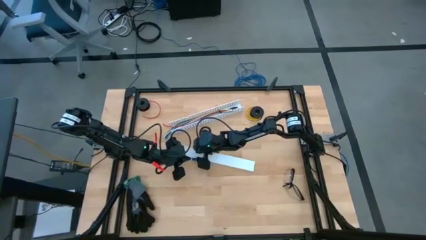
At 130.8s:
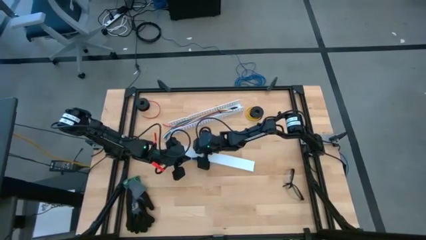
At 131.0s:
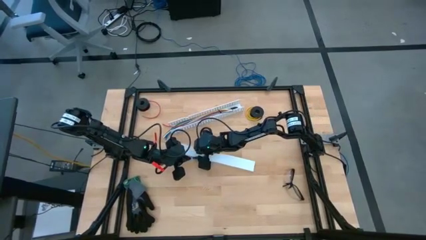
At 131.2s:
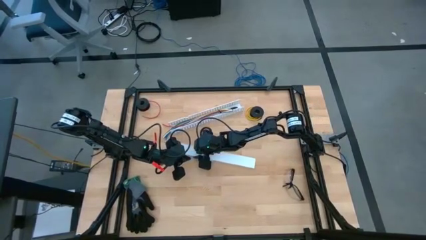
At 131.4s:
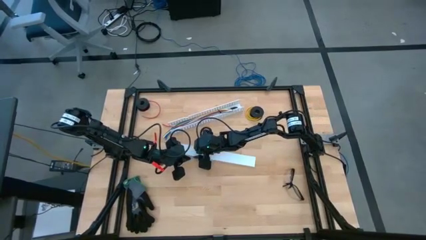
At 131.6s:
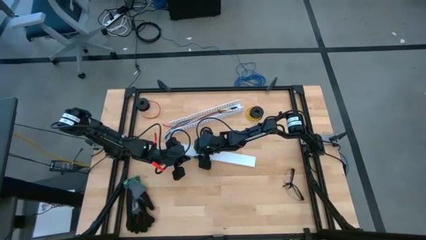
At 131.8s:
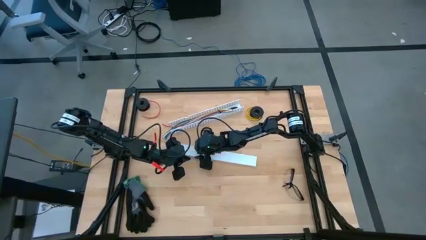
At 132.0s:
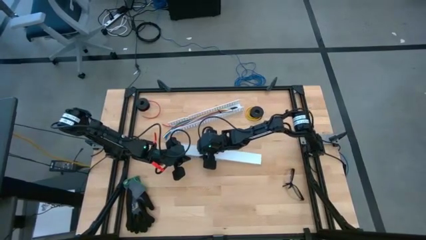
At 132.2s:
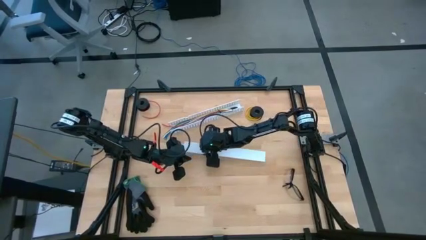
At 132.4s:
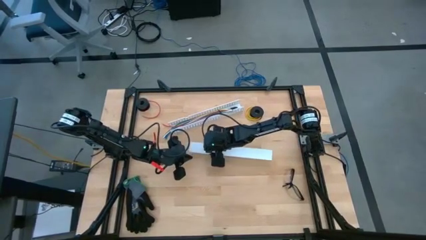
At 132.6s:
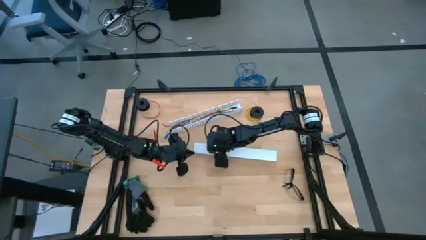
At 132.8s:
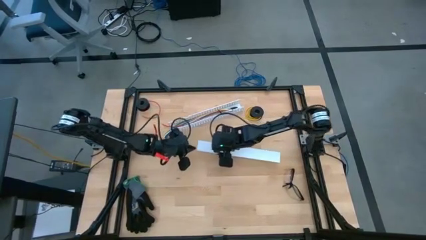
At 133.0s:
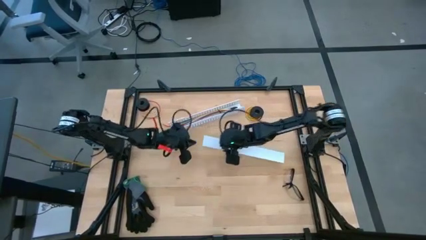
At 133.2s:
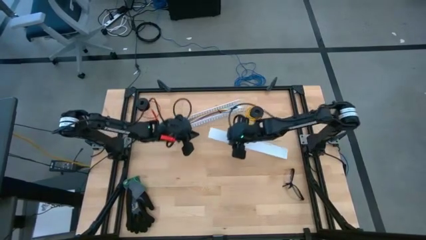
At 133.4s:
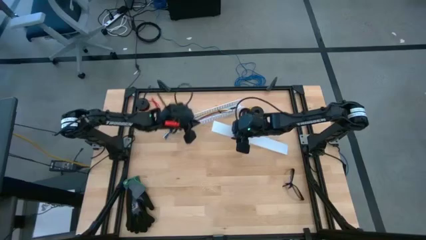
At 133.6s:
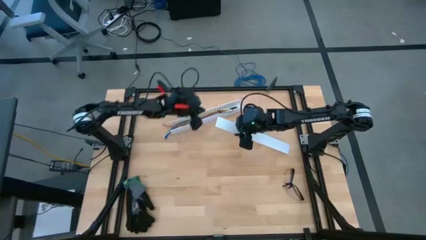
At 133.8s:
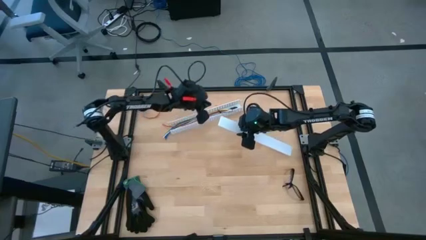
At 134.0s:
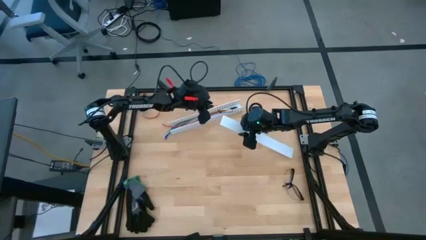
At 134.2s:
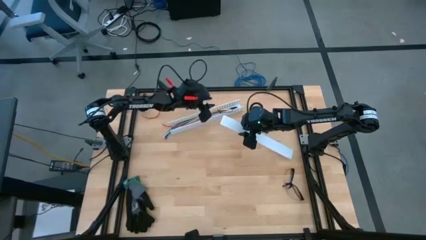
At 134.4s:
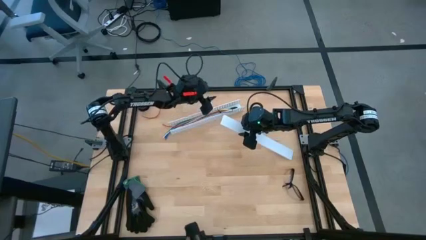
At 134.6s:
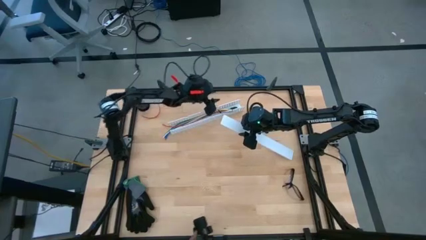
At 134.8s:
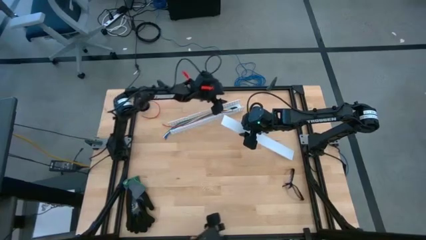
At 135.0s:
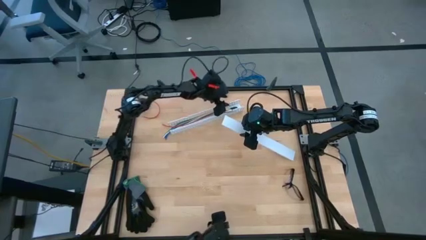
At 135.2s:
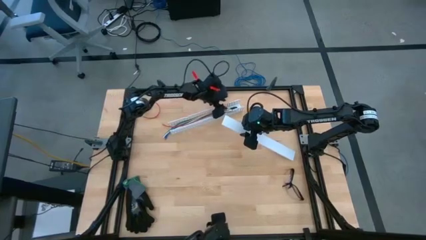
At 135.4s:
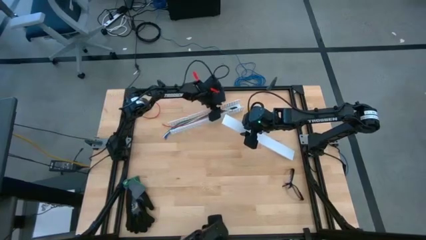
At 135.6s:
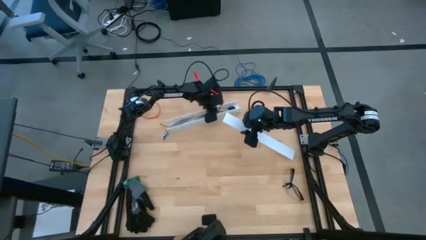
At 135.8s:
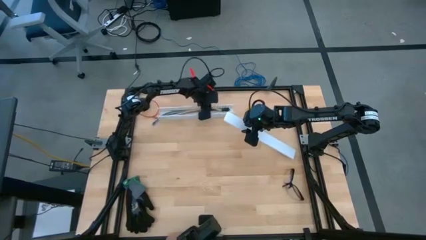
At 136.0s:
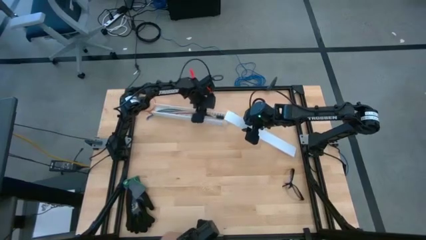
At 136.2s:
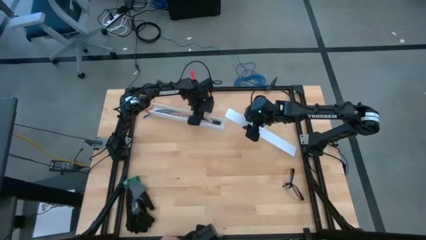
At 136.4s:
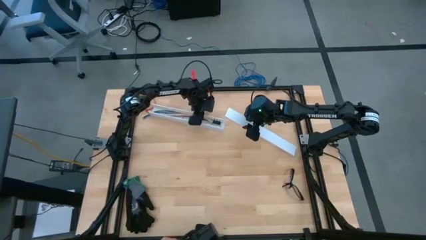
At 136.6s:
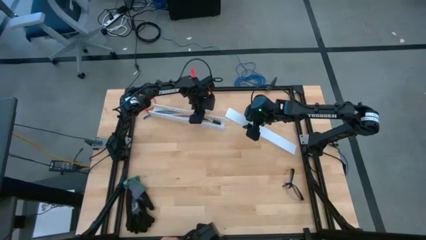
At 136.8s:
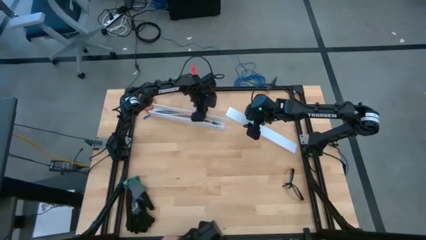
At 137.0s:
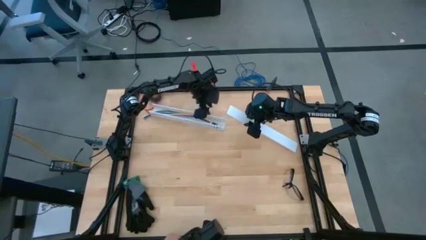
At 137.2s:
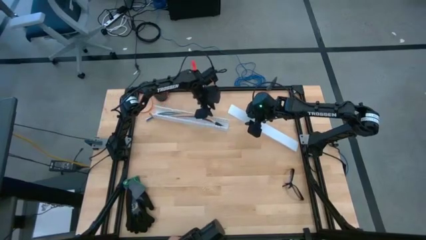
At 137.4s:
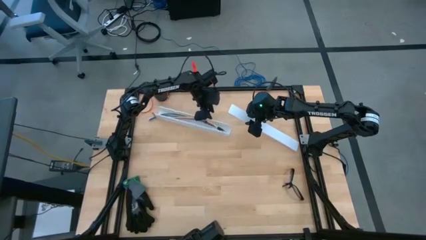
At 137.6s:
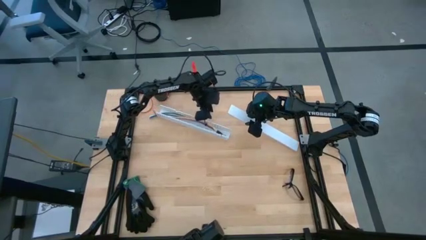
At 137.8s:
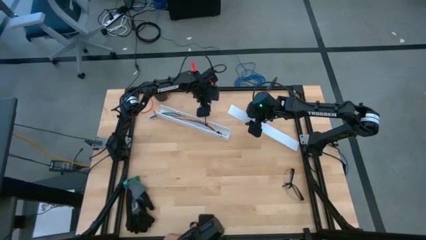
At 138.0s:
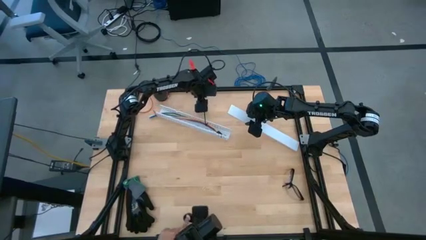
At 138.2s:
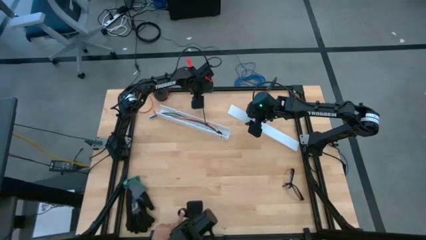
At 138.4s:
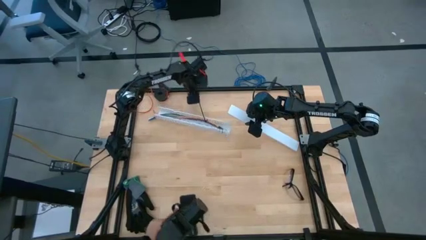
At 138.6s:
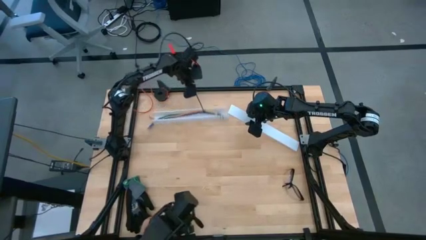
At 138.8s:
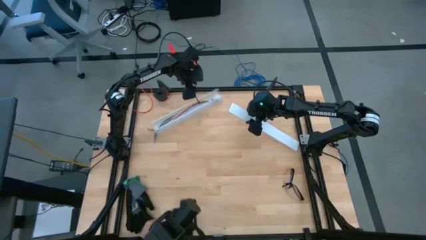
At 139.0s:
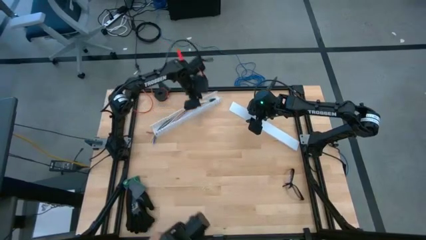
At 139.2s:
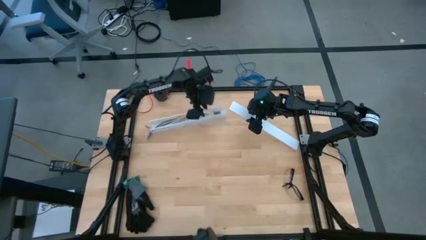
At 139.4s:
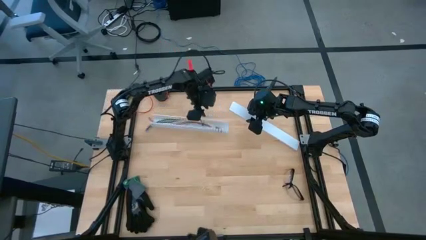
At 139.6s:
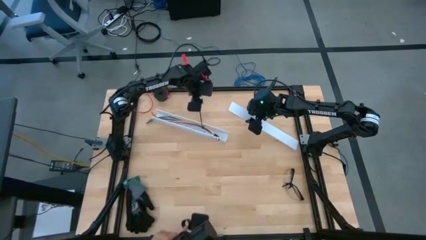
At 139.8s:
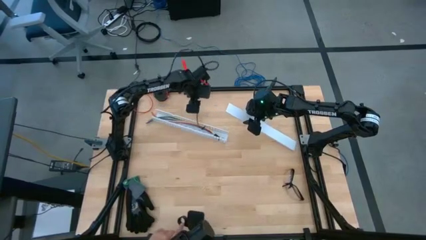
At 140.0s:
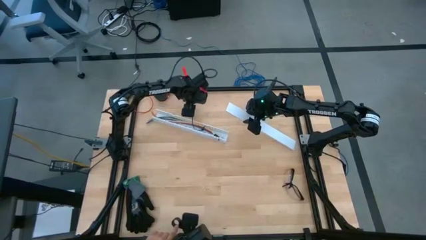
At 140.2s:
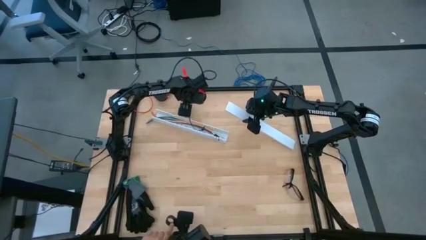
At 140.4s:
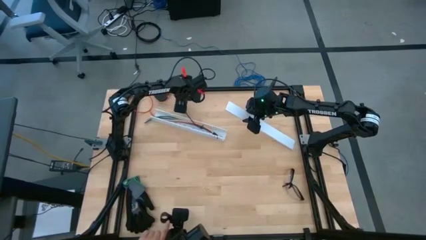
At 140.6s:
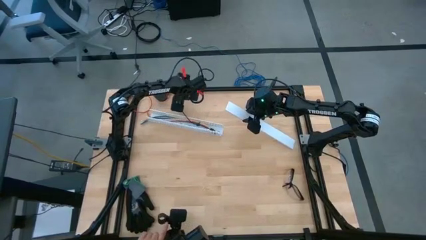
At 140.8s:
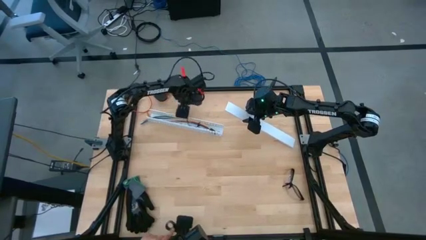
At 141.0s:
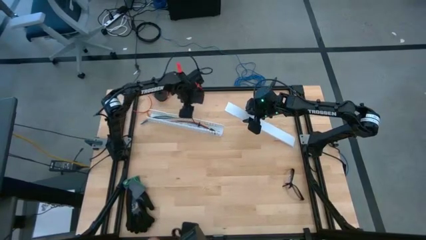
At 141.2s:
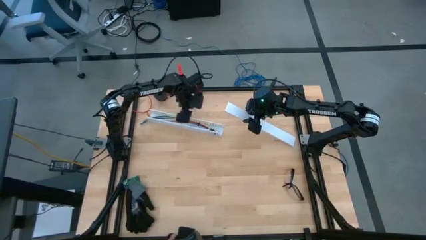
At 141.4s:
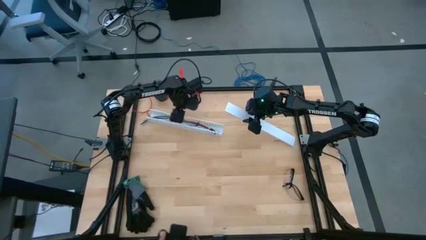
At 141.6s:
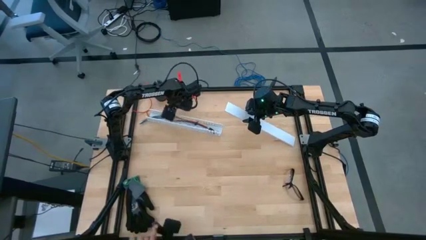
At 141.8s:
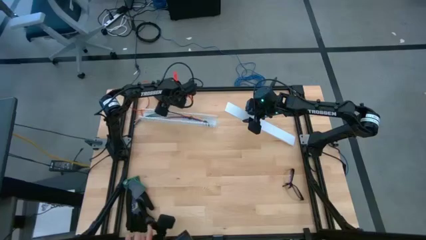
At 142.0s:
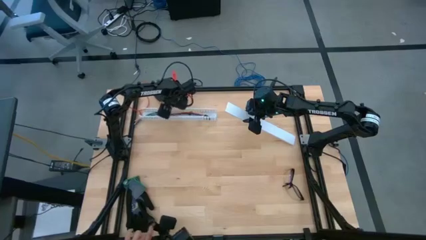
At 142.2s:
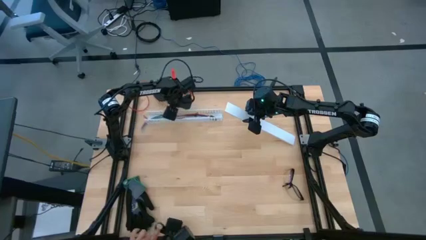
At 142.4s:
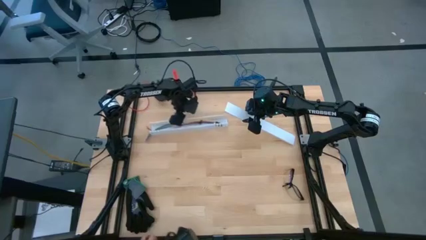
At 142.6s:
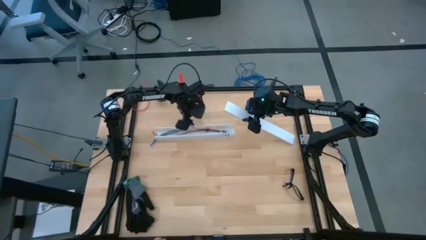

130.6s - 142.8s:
Task: Ziptie cables
Close the white cable duct
